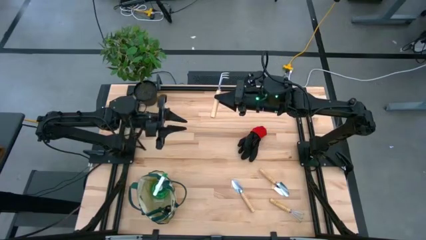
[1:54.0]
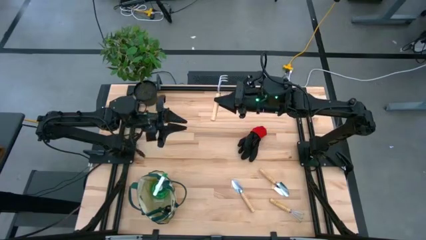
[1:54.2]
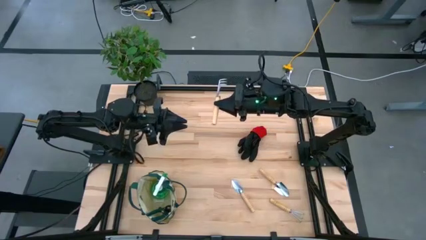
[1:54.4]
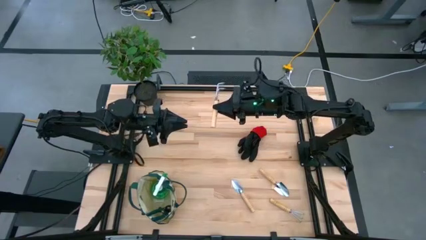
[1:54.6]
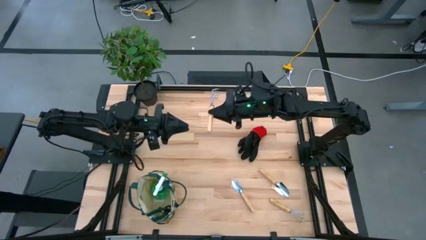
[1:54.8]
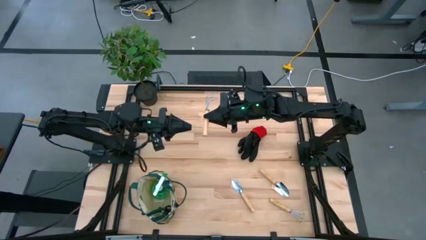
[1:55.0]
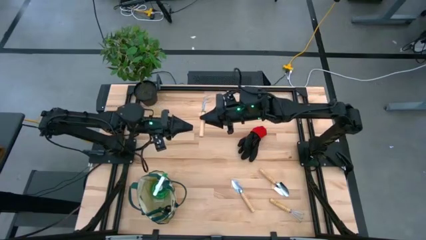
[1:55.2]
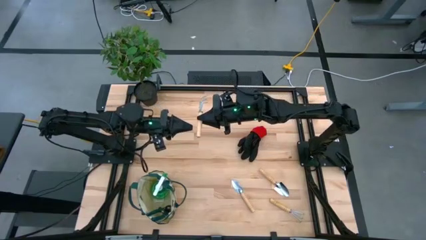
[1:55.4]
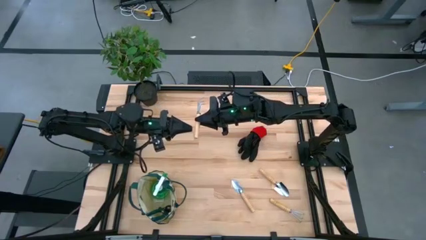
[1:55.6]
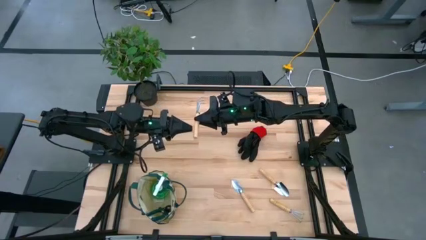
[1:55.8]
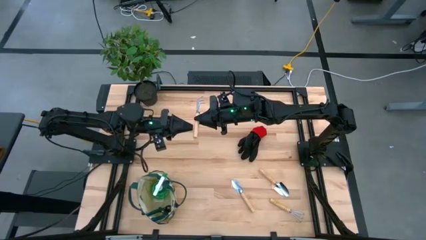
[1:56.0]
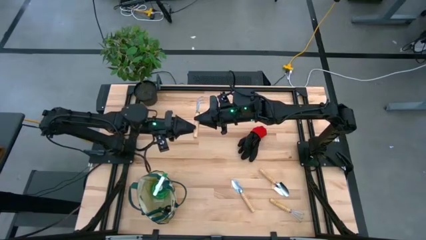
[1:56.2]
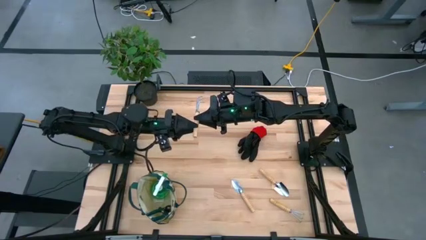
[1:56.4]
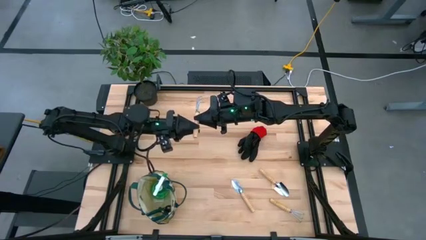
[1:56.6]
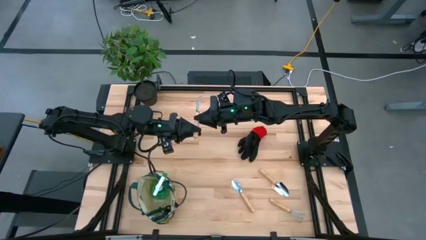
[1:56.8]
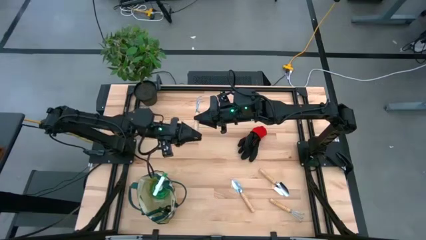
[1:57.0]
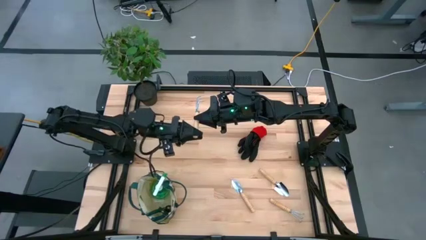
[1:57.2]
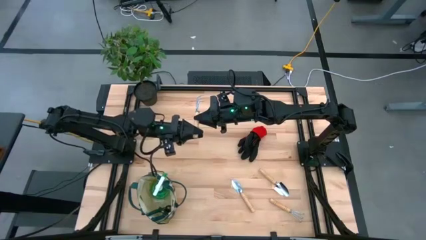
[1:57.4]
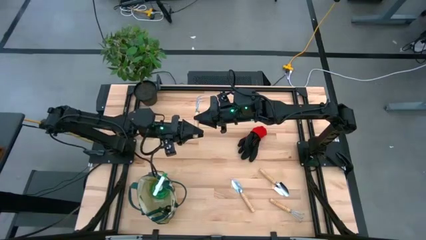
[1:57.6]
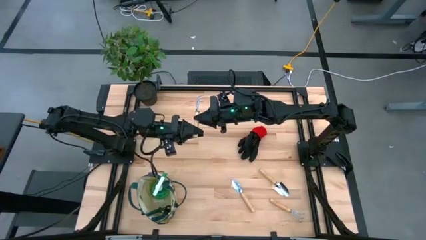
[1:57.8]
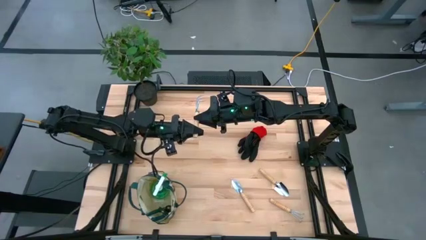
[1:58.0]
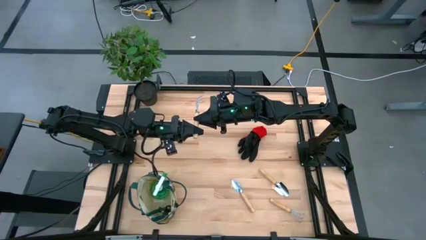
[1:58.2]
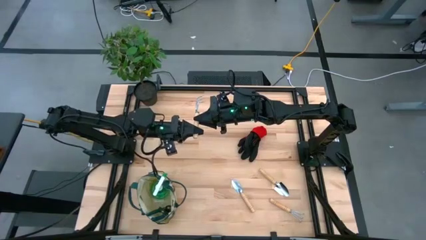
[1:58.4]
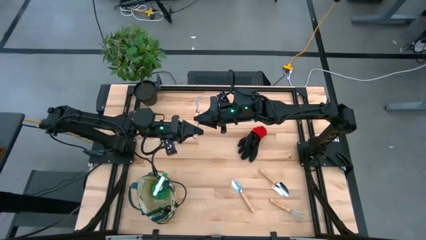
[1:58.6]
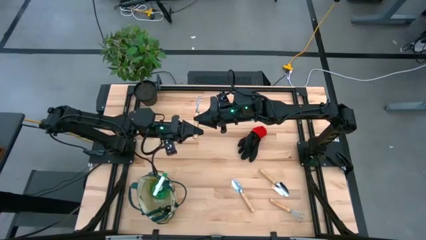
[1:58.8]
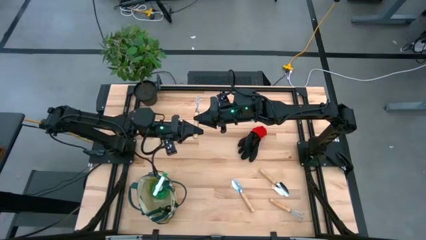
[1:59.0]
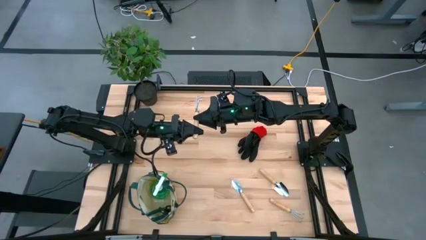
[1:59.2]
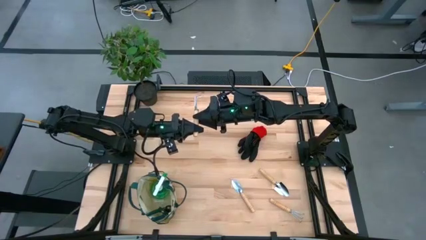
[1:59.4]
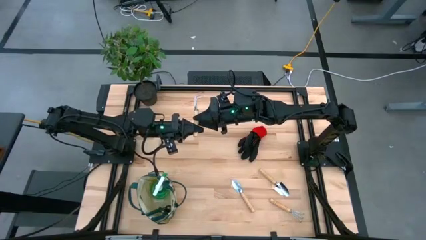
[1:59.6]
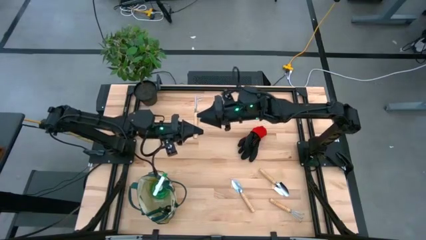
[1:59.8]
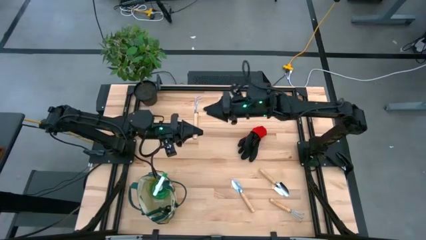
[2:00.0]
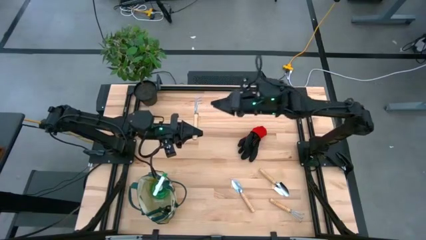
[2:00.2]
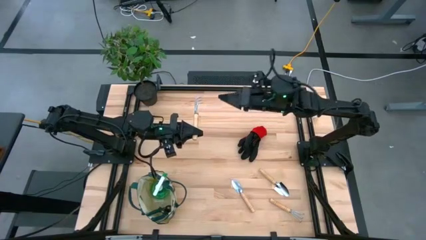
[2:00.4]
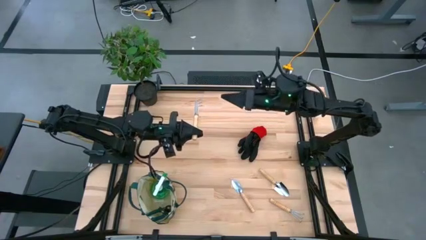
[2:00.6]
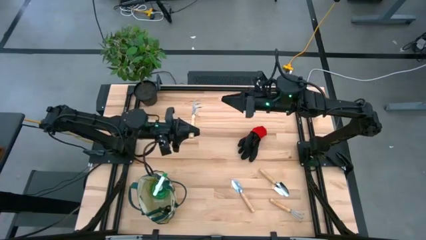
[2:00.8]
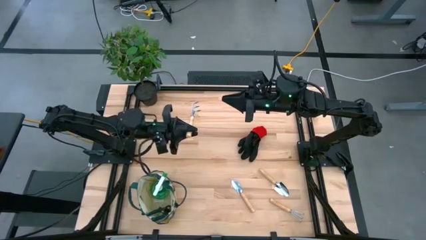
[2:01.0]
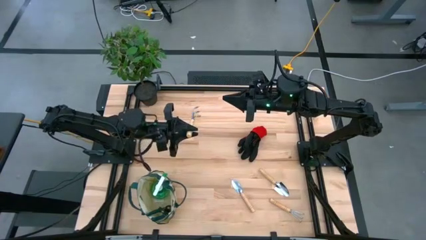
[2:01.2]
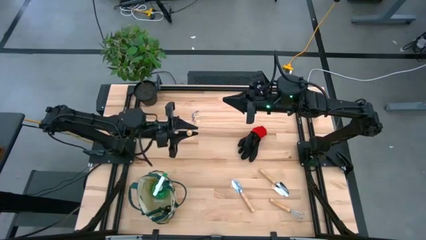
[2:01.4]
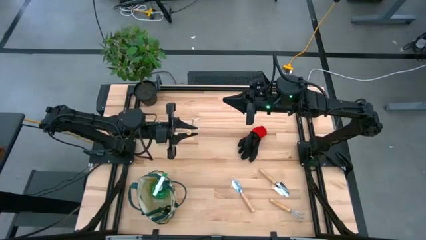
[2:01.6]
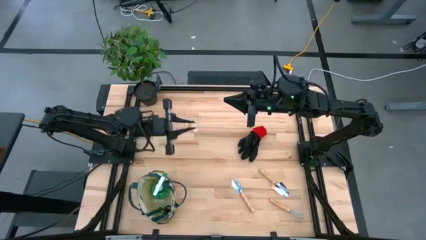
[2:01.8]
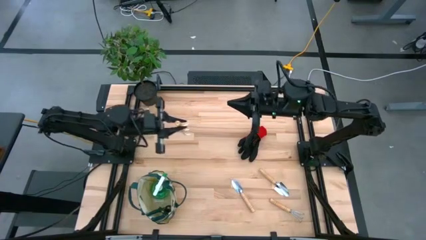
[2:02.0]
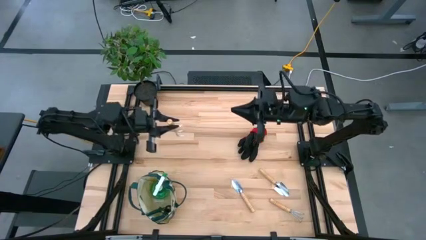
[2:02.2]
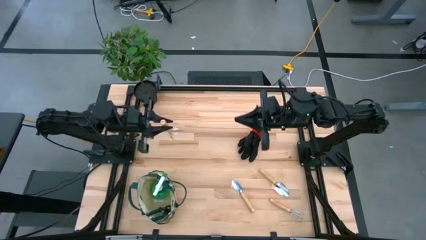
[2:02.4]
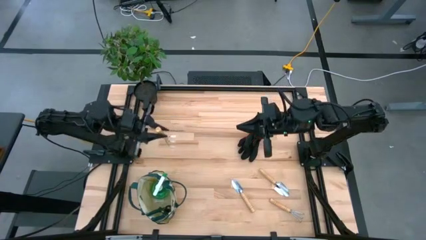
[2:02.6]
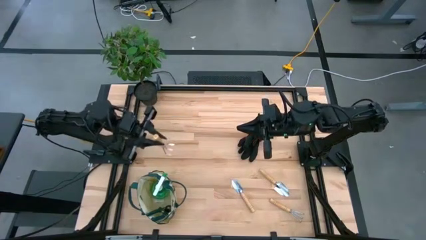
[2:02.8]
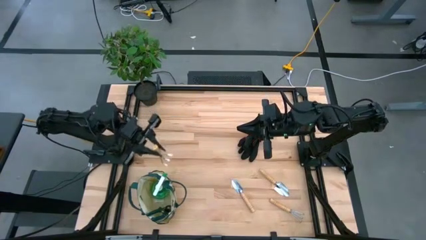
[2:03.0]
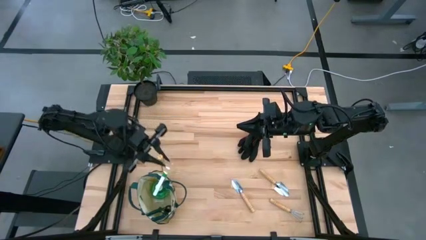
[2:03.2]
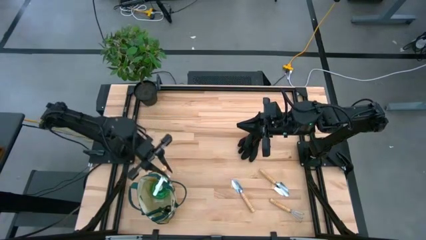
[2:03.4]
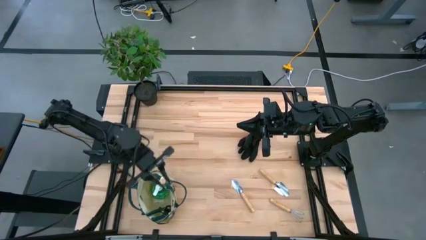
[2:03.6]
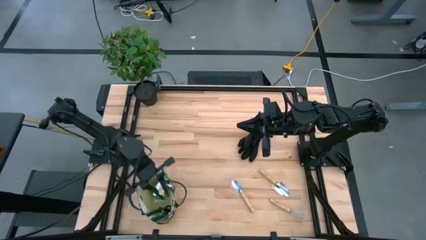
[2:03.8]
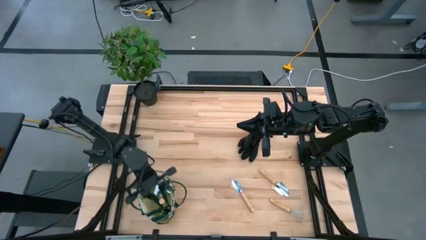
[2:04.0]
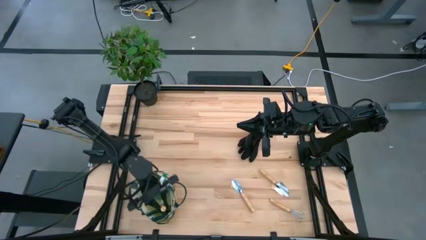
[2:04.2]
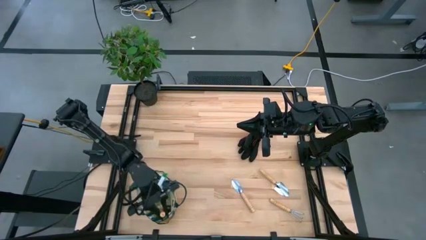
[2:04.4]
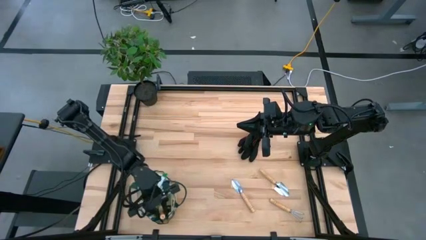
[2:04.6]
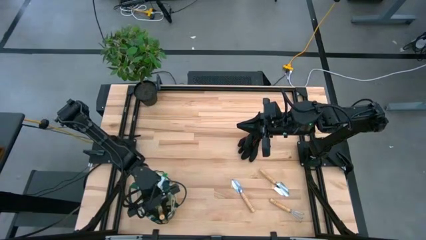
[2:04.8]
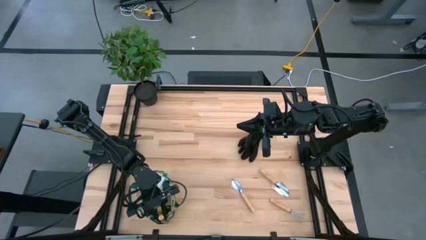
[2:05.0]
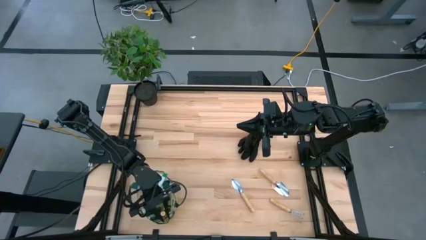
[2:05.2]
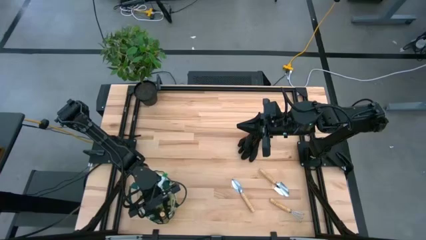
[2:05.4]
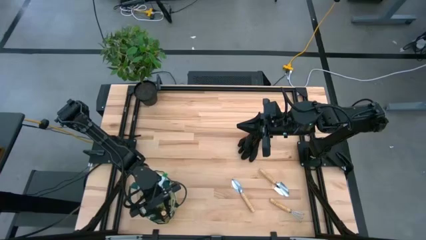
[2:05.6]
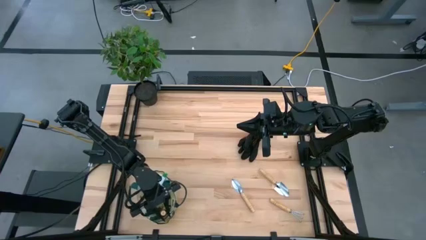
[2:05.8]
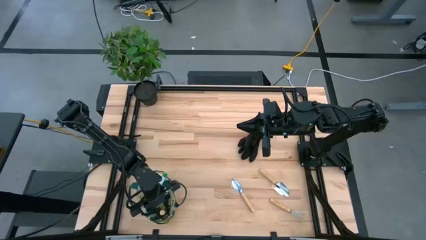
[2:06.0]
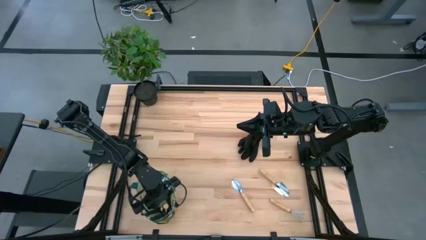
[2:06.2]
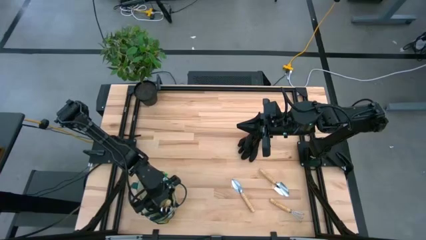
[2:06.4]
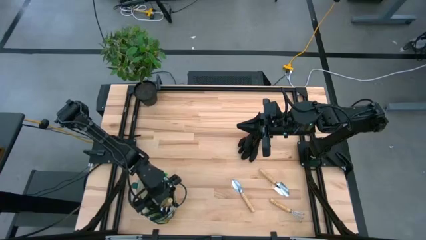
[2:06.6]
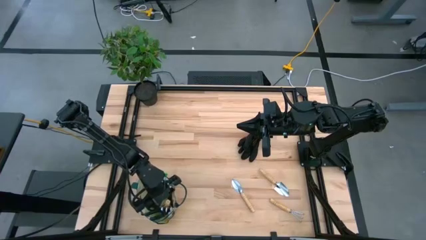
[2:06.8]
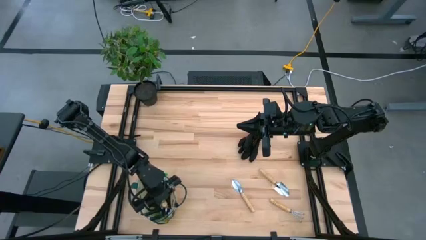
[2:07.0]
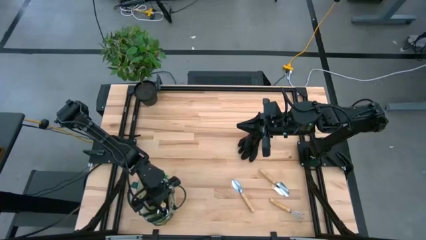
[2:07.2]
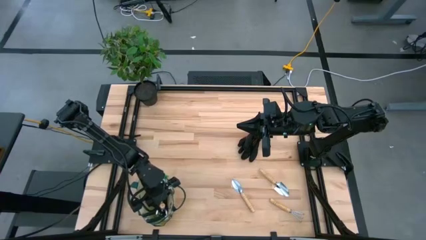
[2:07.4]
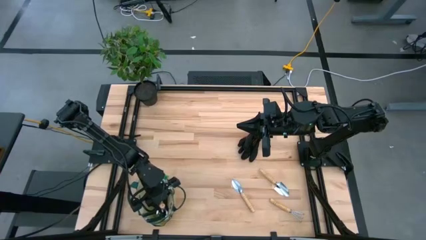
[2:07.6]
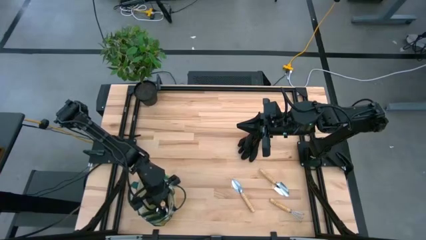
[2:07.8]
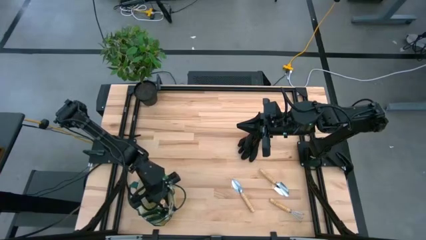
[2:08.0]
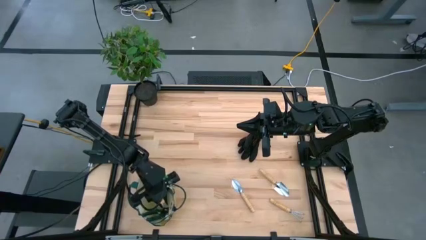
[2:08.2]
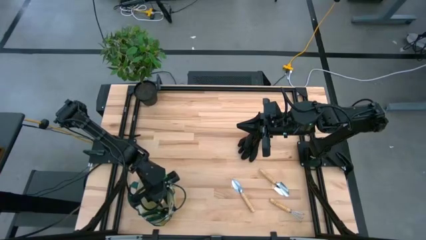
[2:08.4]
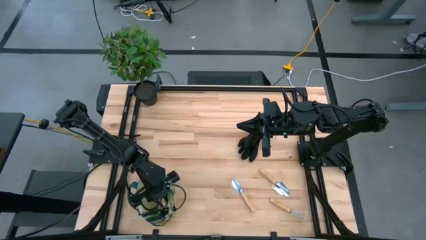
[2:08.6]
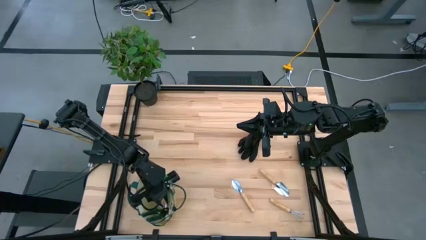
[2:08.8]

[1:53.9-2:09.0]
Task: Pick & Place Garden tools in Gardening bag
Put the top hand rake into the gardening bag
